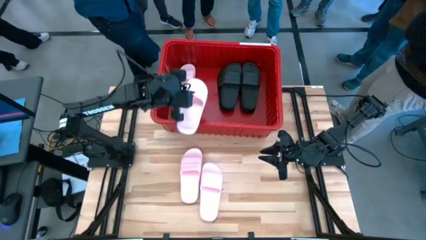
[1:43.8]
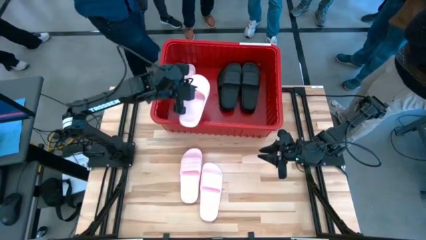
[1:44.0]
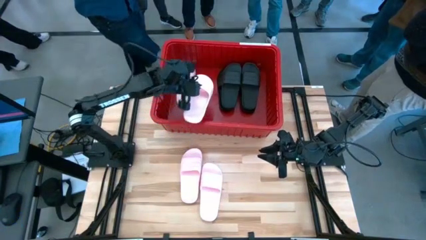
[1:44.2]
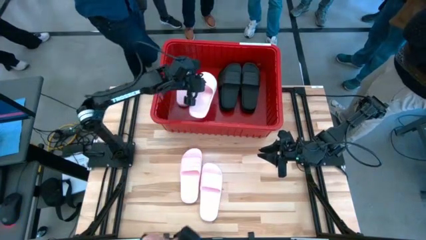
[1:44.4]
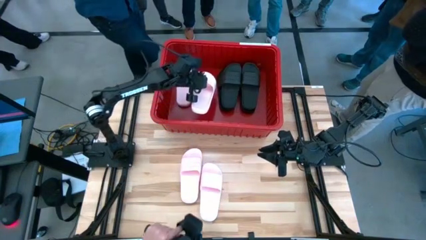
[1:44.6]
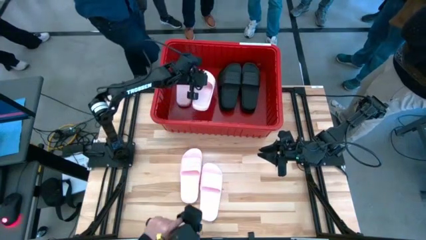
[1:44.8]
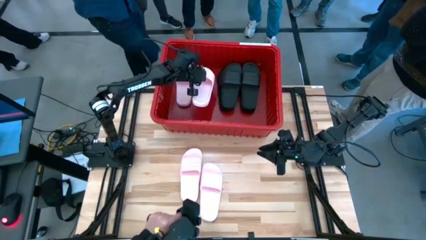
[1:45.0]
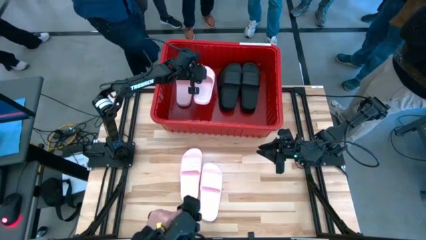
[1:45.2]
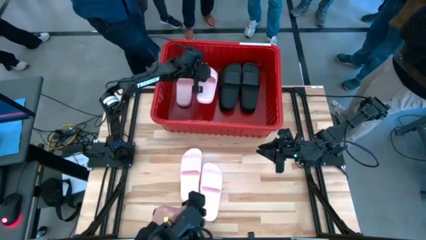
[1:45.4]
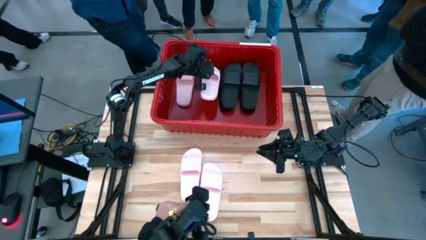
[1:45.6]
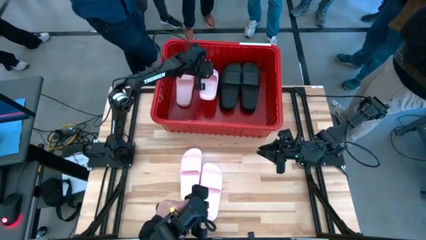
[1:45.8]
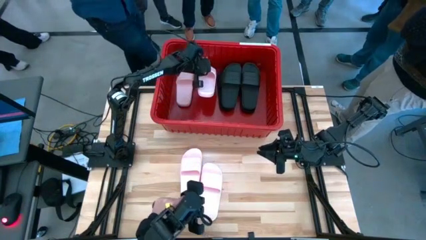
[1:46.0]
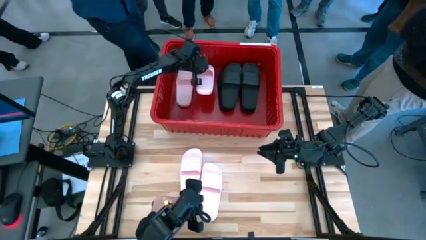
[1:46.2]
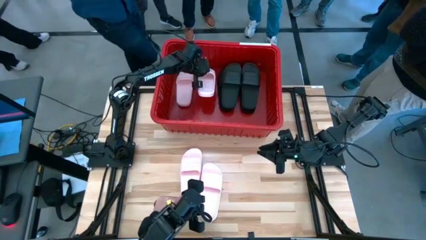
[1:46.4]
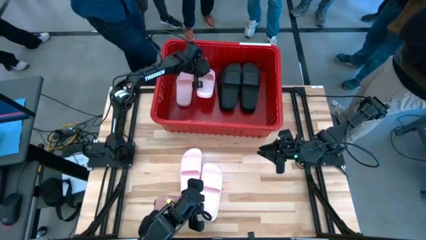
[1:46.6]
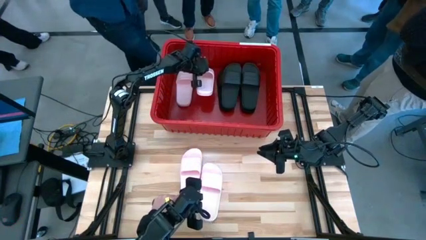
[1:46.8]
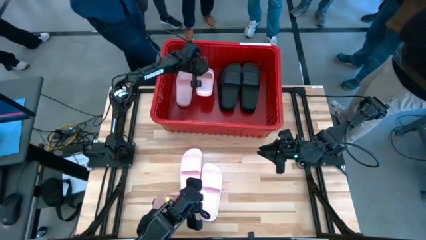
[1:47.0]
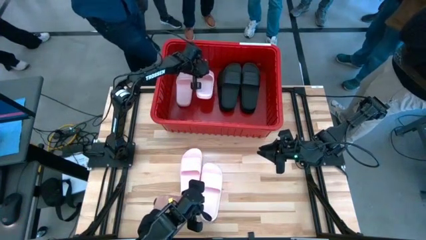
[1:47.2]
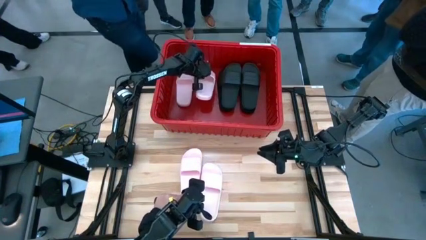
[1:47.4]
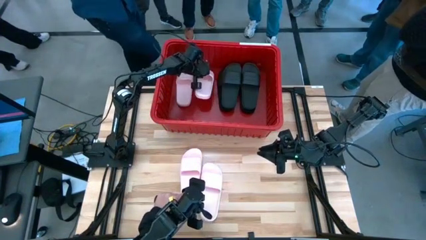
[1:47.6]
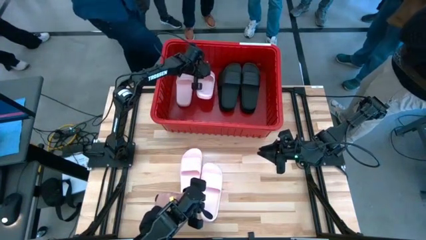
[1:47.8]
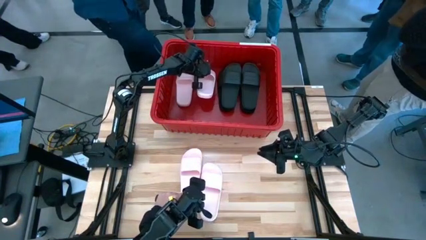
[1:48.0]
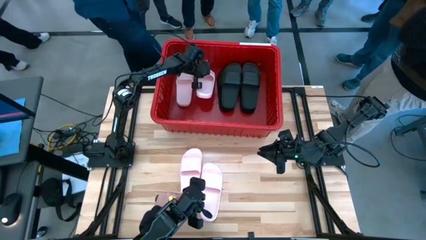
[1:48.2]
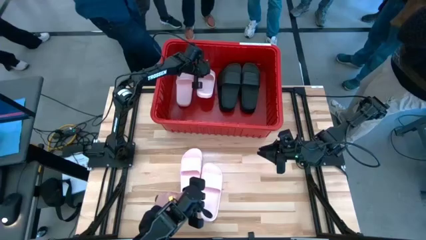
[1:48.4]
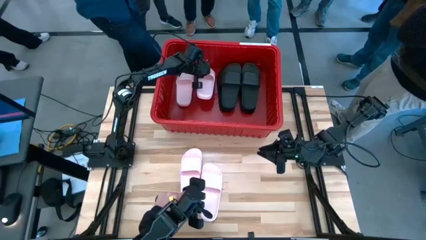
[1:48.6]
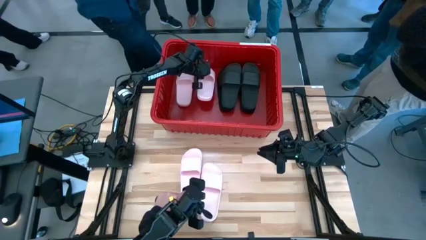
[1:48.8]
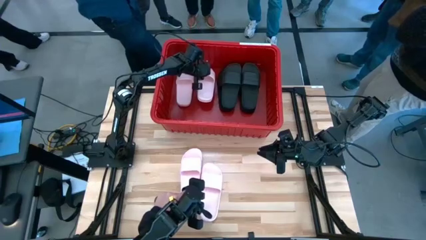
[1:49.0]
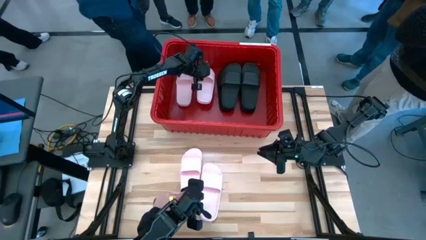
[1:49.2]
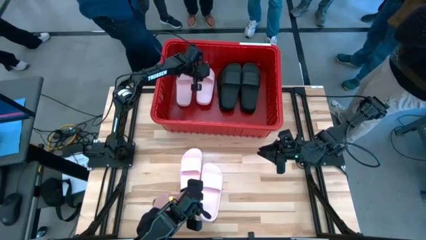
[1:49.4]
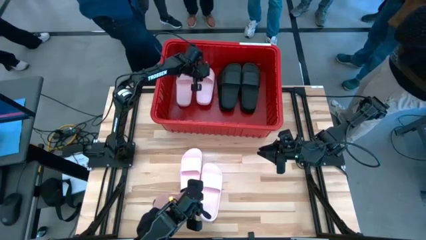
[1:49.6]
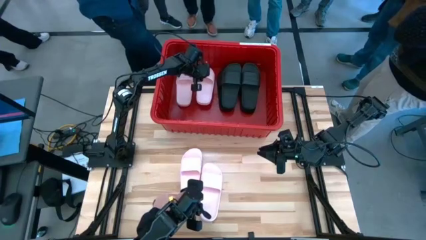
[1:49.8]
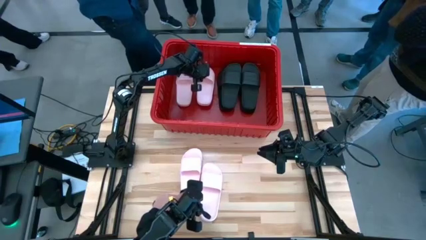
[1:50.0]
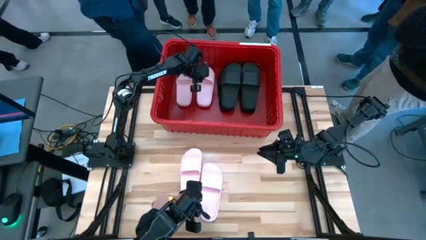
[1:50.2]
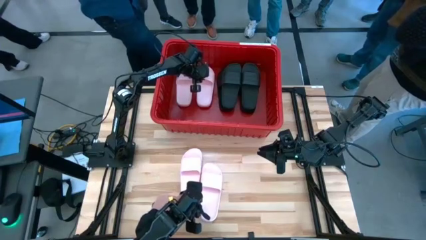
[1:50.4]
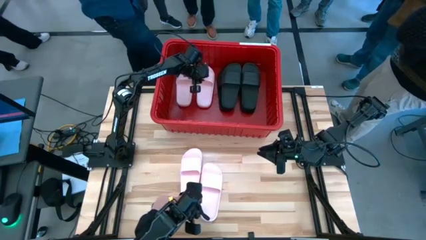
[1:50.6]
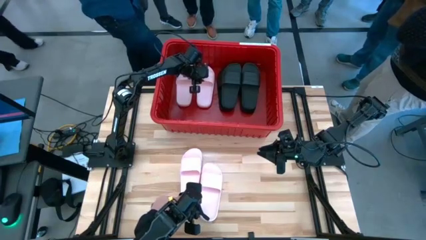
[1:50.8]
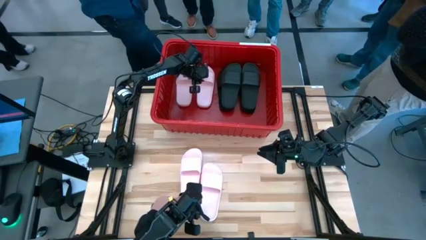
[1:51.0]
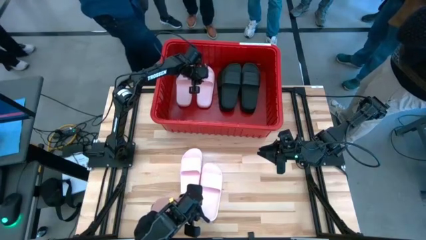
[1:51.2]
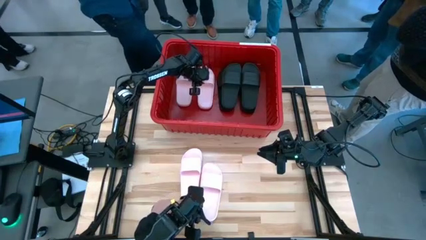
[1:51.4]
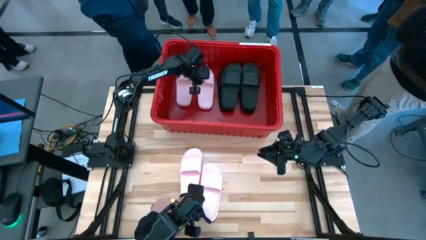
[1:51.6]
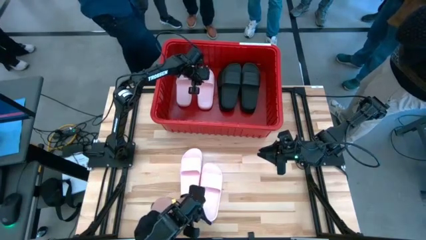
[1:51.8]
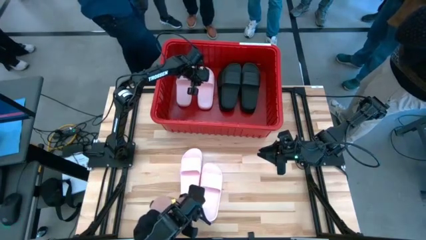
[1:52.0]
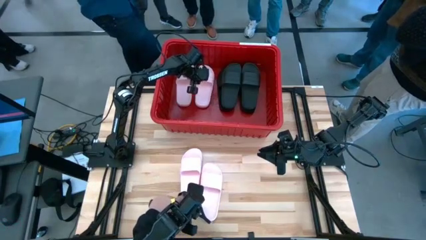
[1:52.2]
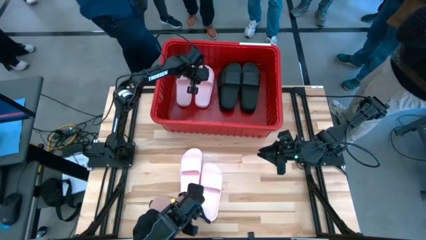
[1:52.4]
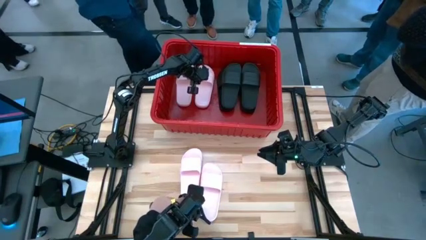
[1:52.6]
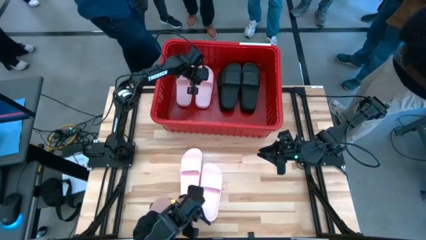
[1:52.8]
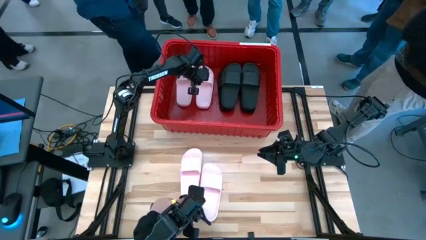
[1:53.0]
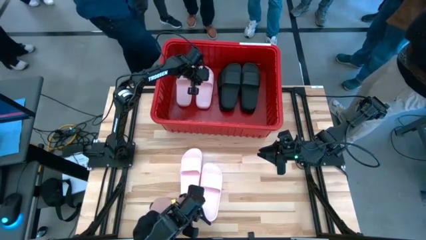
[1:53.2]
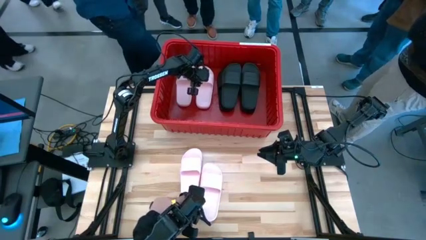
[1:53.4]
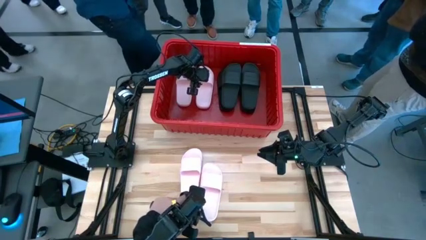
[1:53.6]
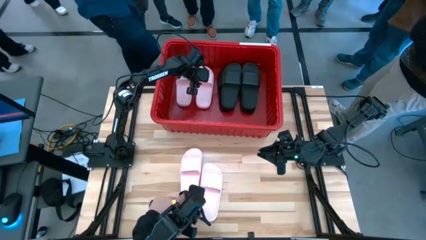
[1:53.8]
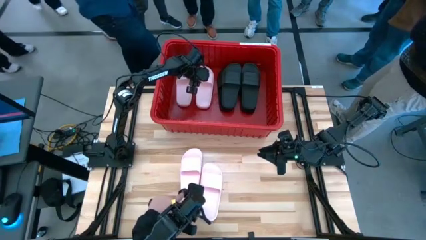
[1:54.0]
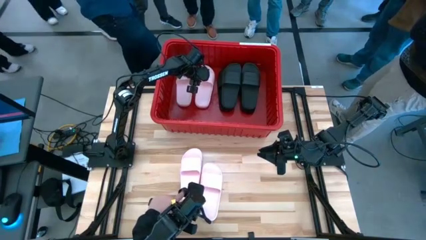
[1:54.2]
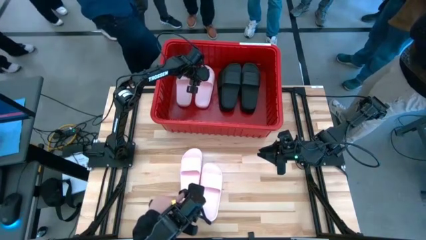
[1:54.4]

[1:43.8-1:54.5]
Task: Pick and place slides into bin
Put the pink slide into the red container

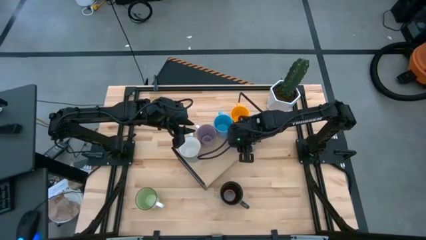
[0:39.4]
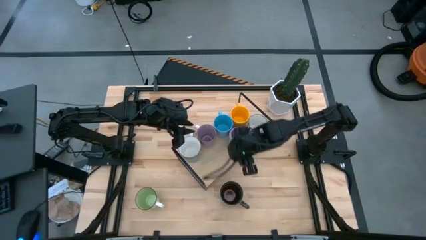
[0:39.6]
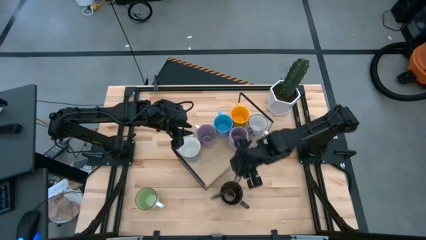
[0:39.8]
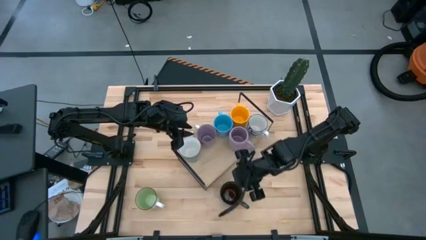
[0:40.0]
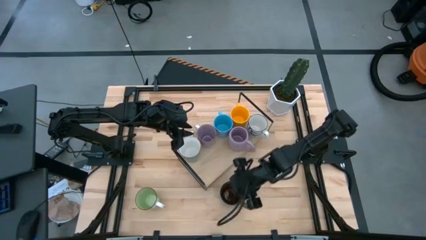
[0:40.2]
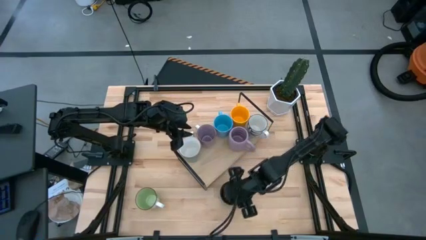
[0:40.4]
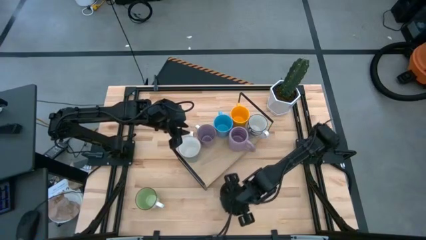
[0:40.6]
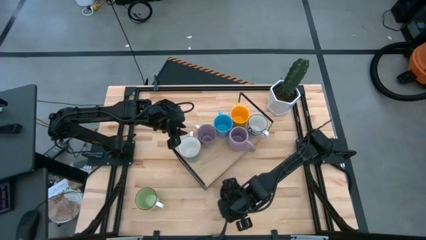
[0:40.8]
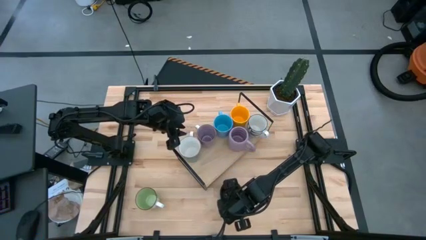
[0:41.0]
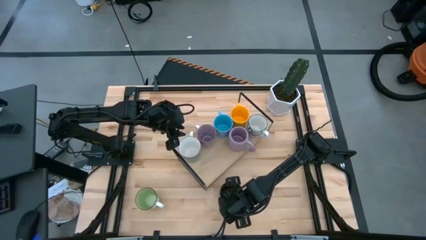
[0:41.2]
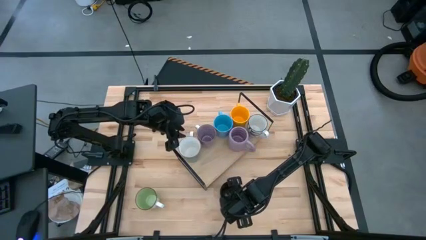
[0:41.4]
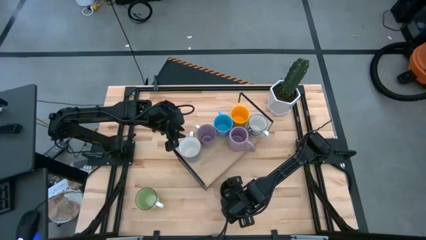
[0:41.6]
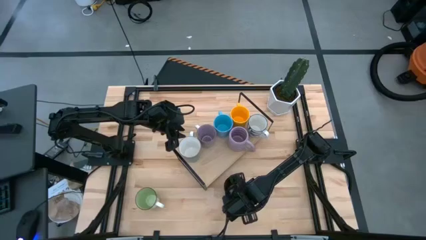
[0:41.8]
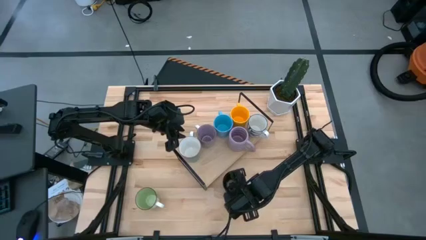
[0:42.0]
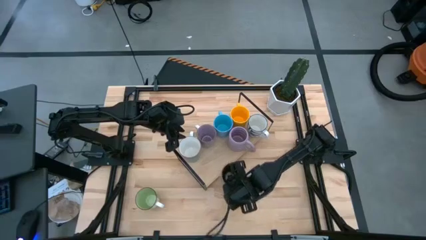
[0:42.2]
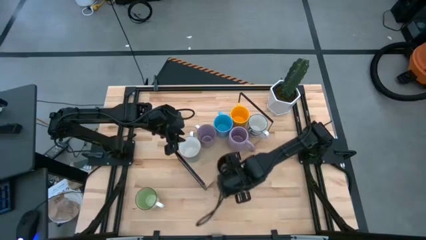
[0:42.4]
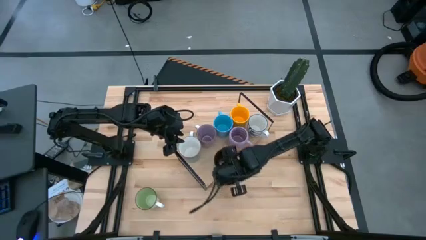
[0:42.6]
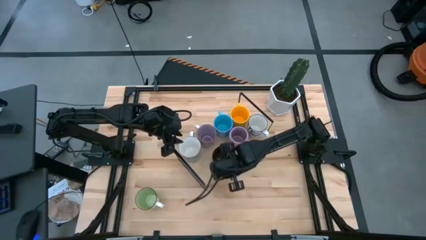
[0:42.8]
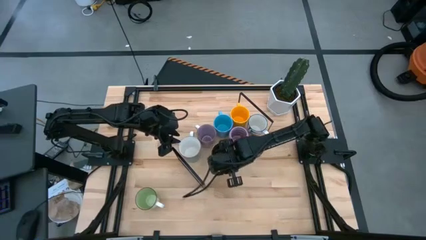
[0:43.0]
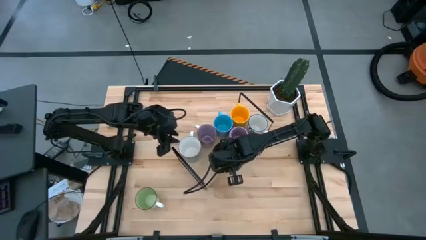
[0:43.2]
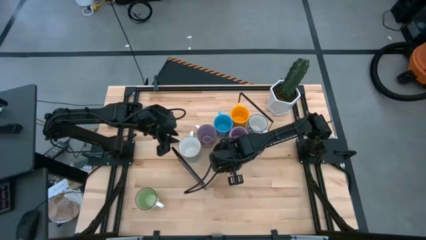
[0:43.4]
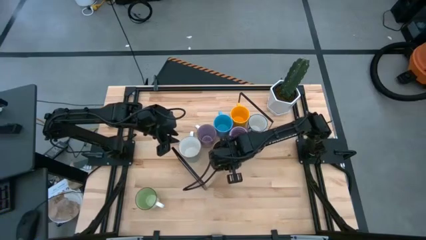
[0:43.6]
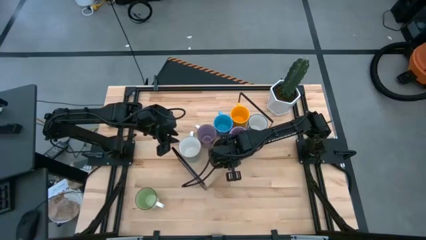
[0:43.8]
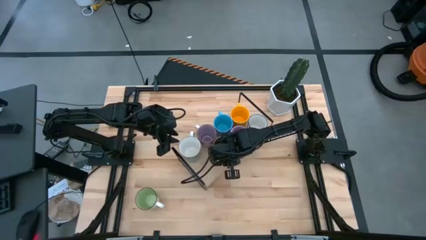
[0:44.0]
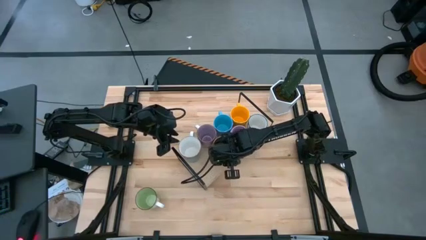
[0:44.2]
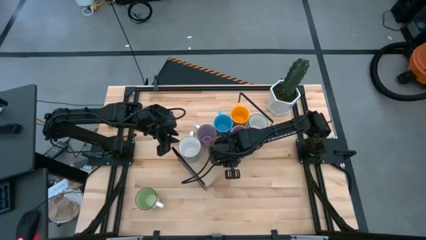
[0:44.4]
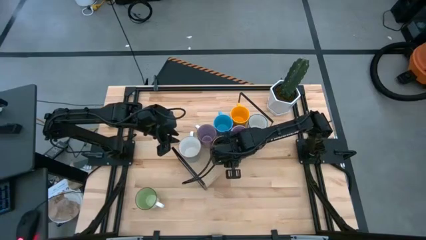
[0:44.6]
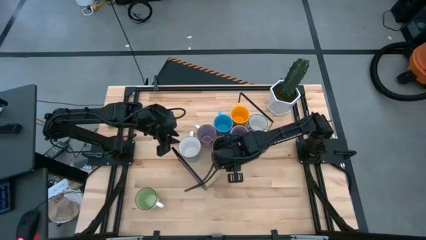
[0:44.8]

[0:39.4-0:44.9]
Task: Place coffee mugs
Put the patterned blue mug onto the shelf
